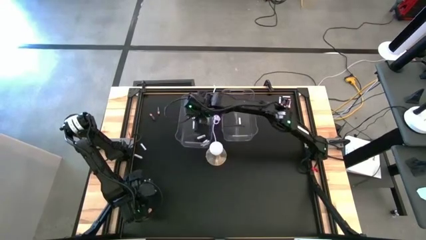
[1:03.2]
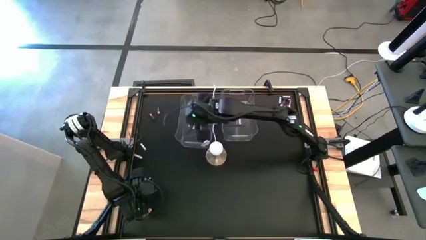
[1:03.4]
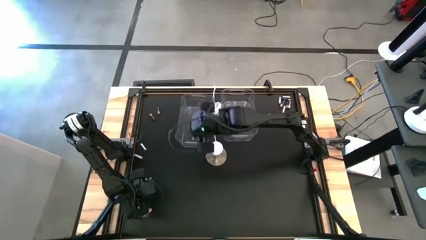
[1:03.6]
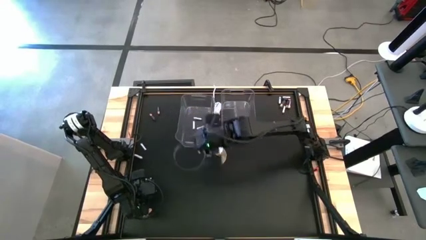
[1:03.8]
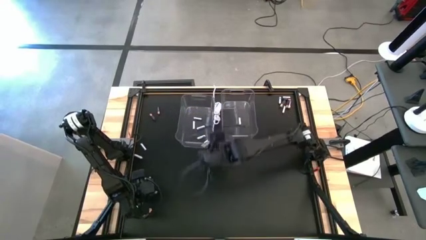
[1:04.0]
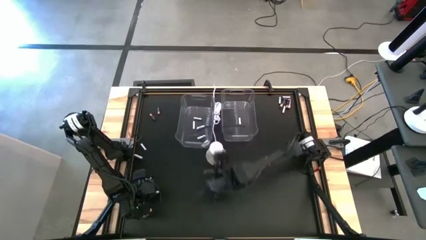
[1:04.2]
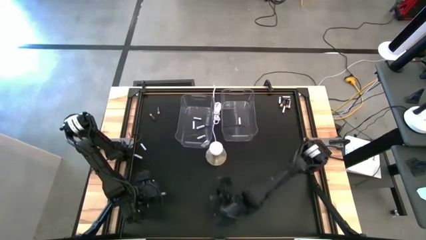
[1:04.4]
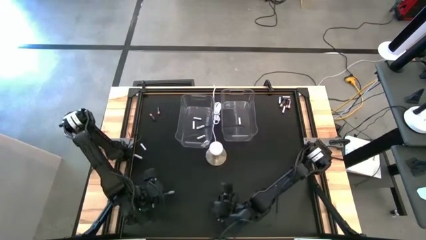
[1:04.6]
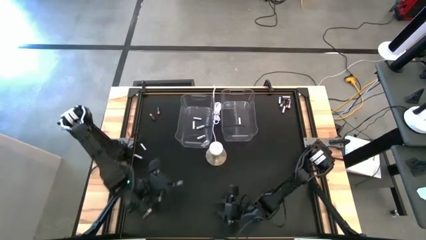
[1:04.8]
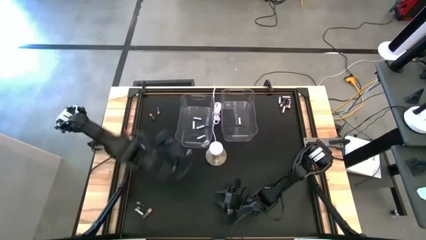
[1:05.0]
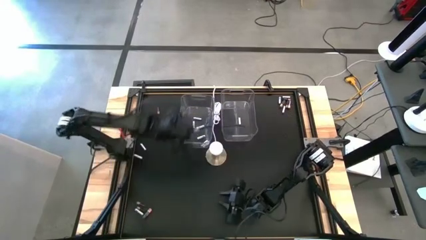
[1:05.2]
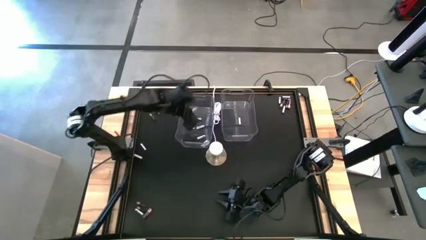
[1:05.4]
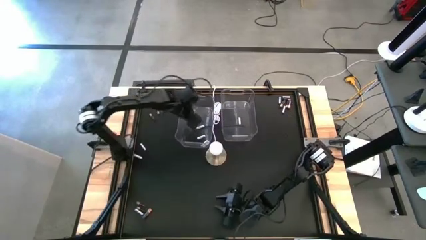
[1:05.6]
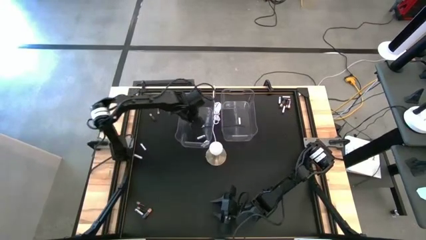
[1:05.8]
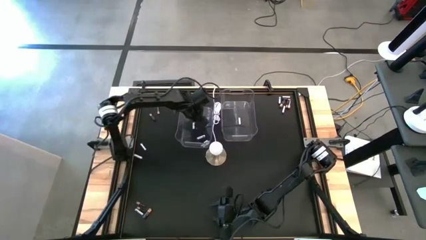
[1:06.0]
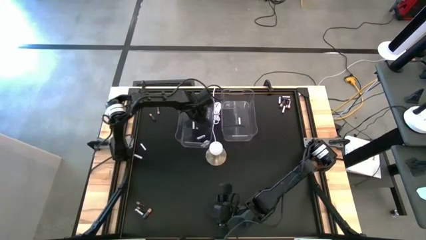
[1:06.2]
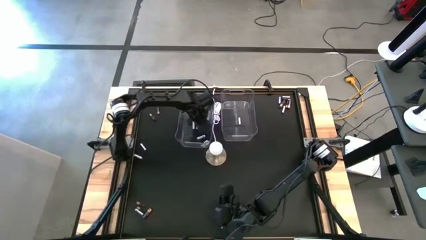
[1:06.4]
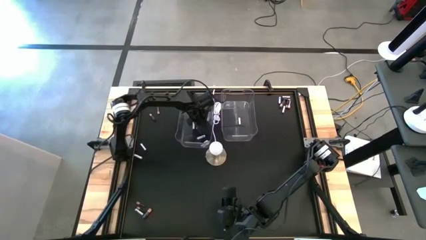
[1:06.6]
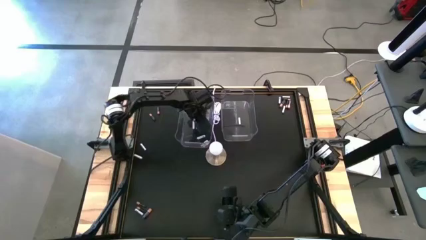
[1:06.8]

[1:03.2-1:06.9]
Task: Sort batteries
Put the white battery into the left transparent bin

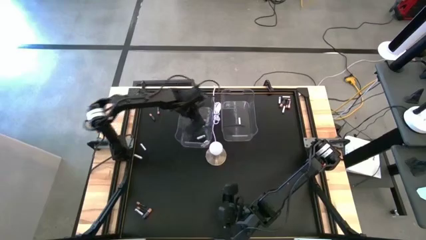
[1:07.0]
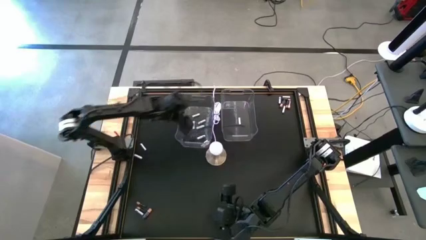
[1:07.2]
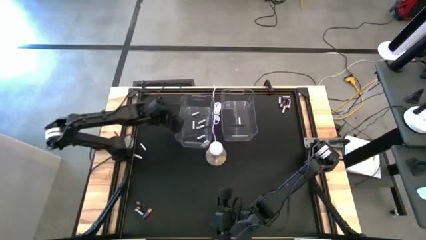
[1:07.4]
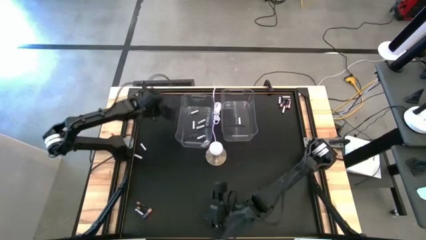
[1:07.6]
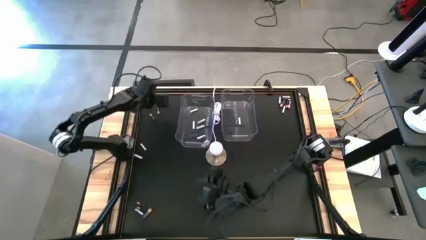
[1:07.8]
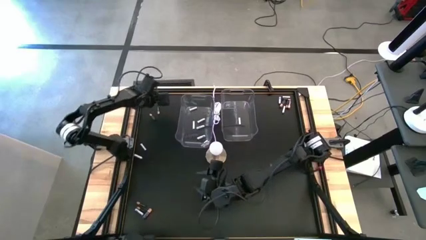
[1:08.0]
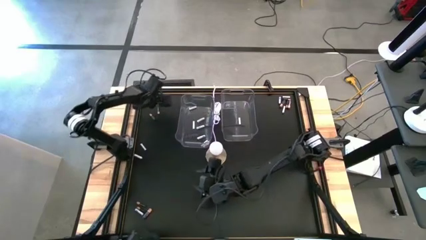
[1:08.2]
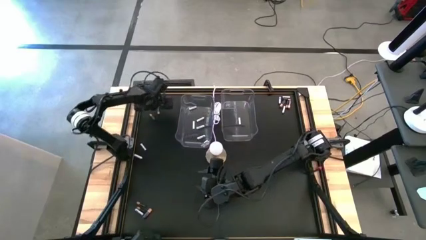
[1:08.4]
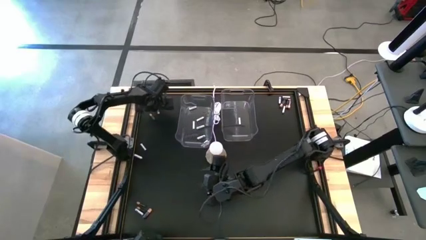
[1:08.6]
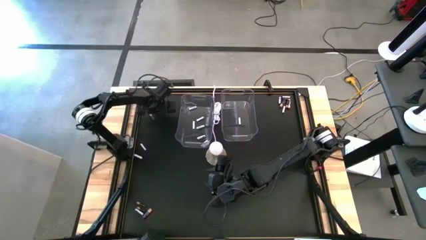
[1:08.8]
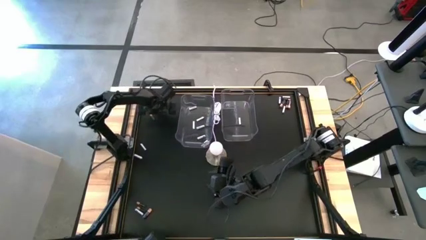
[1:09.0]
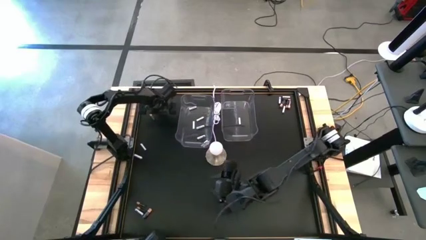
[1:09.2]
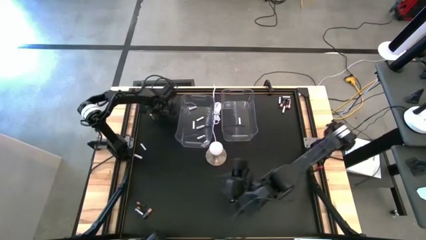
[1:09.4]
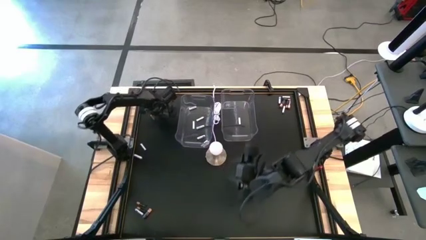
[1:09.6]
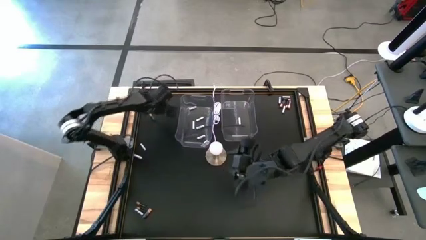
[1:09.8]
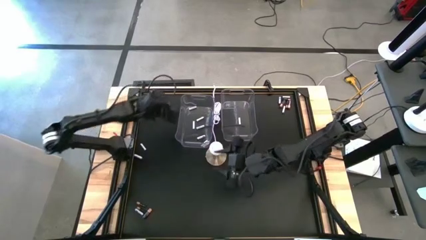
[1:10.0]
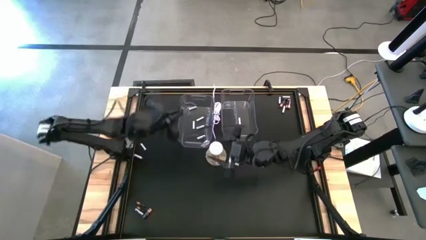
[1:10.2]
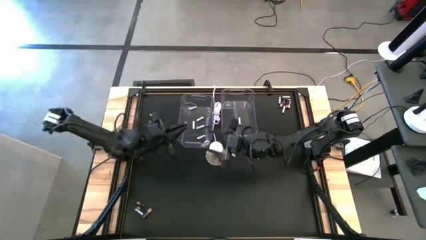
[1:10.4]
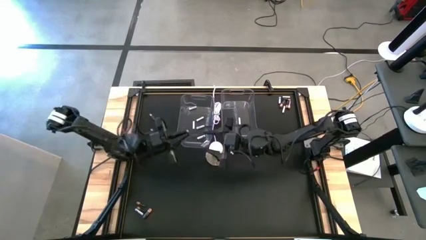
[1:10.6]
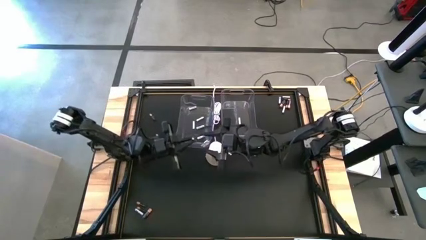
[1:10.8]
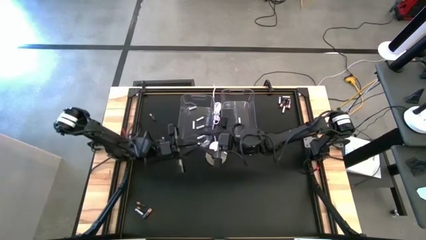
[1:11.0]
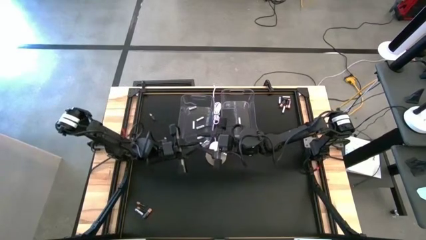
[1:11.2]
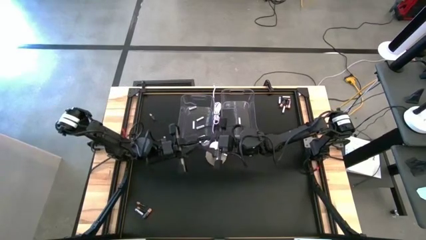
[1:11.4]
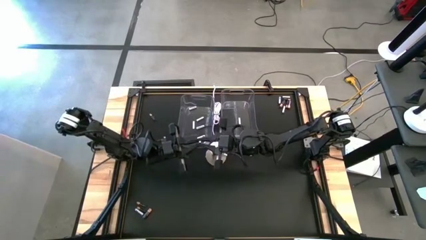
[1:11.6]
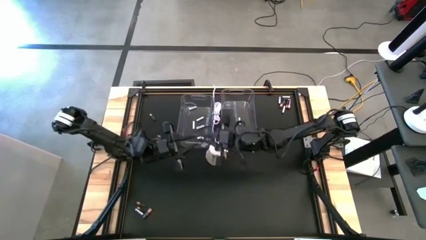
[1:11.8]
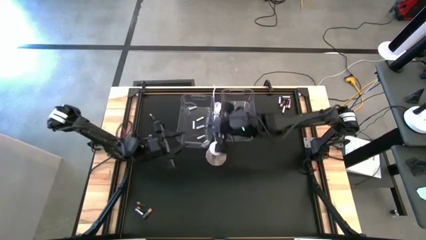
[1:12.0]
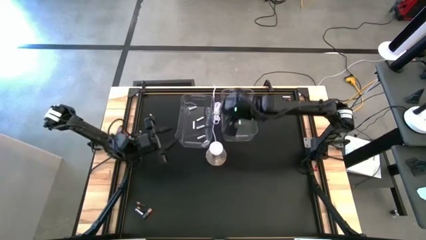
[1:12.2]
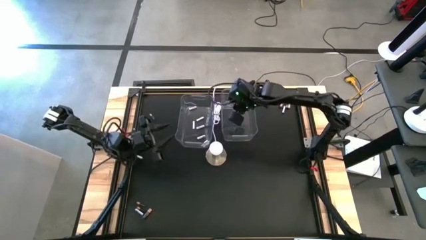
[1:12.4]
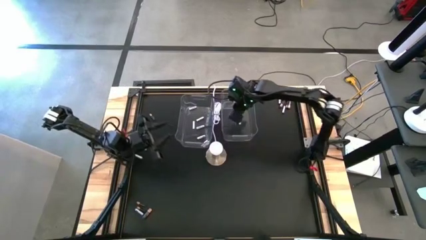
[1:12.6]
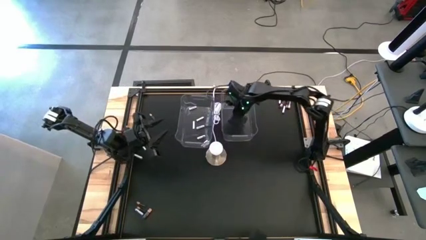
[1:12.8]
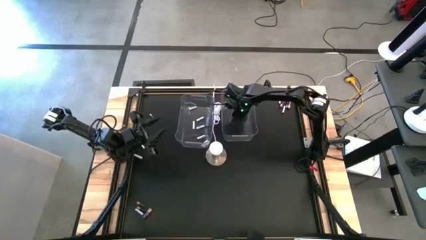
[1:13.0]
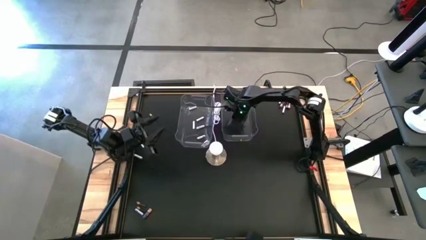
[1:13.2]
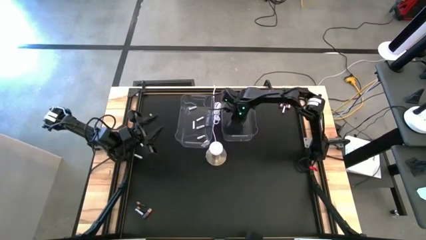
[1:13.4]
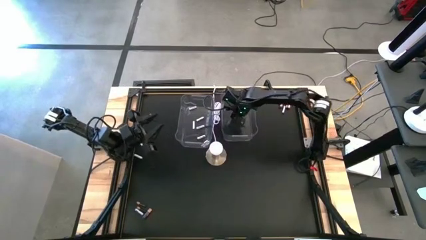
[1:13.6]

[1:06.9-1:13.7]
Put the black battery into the right transparent bin

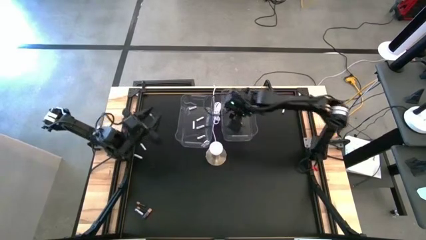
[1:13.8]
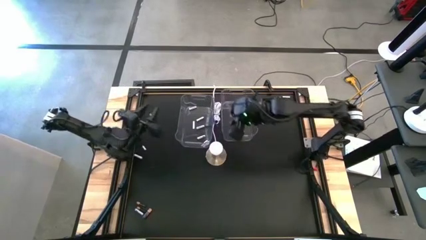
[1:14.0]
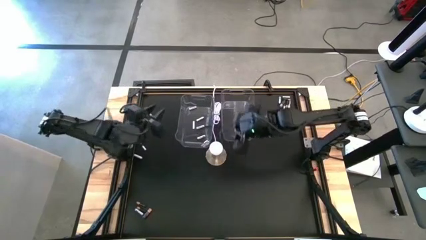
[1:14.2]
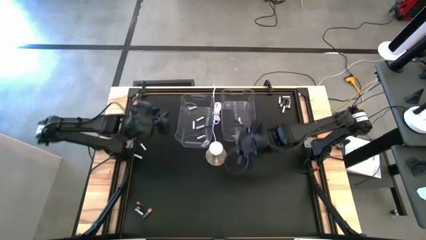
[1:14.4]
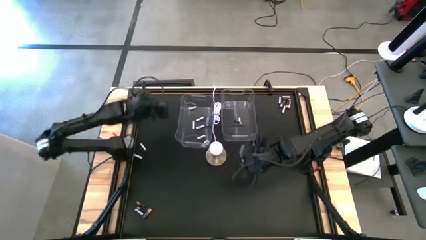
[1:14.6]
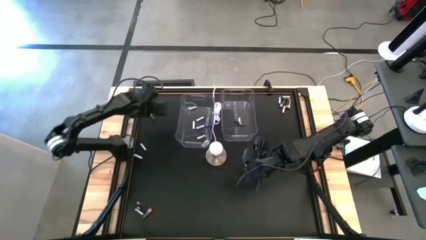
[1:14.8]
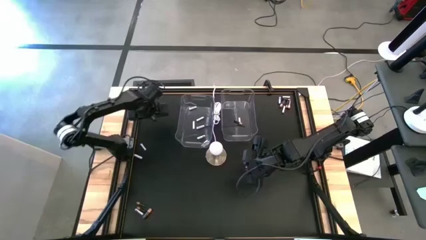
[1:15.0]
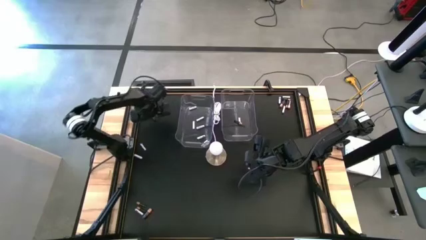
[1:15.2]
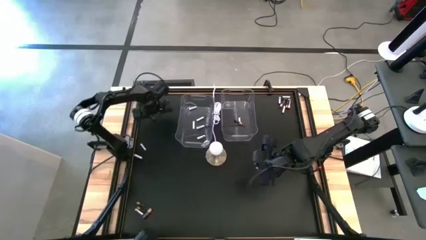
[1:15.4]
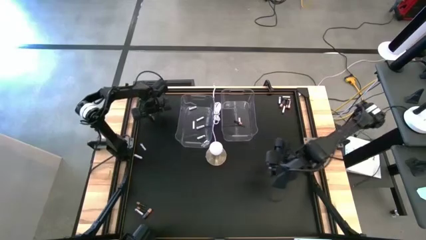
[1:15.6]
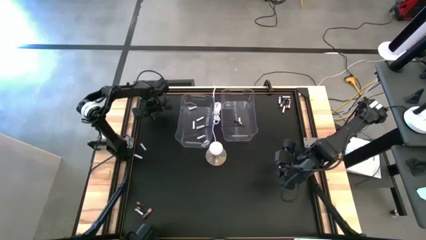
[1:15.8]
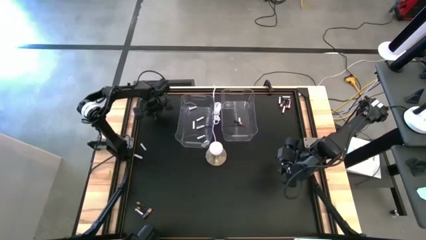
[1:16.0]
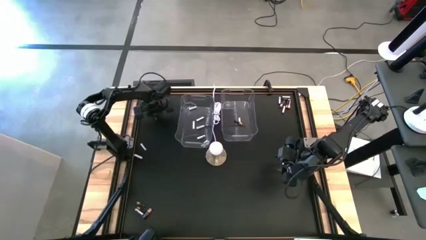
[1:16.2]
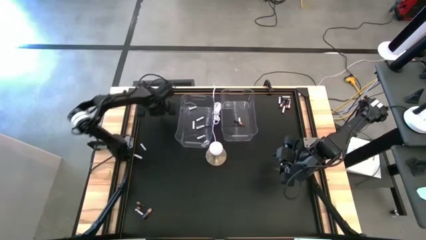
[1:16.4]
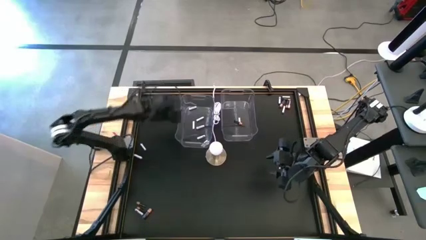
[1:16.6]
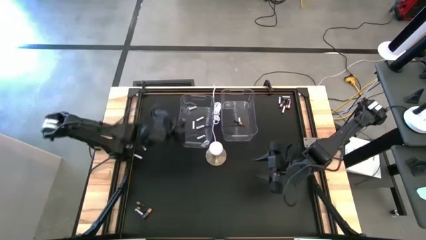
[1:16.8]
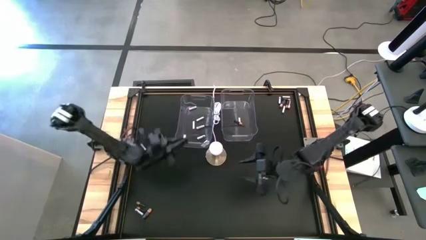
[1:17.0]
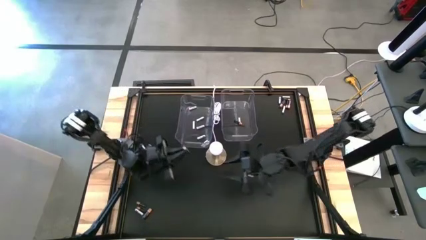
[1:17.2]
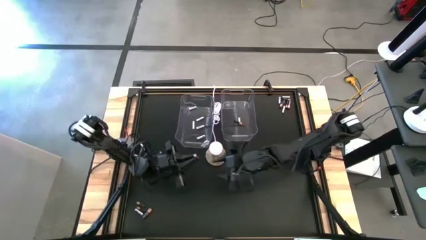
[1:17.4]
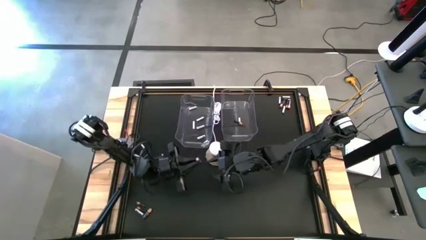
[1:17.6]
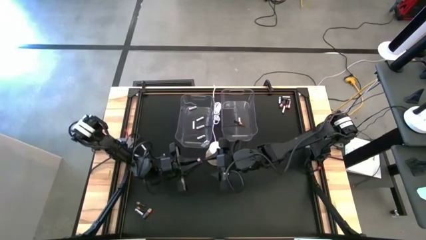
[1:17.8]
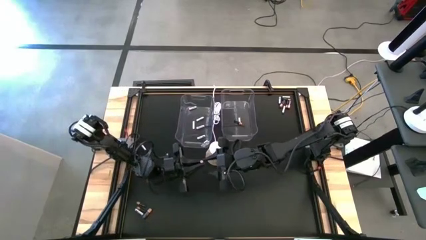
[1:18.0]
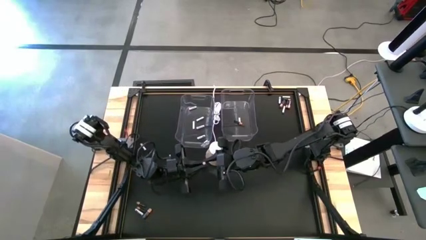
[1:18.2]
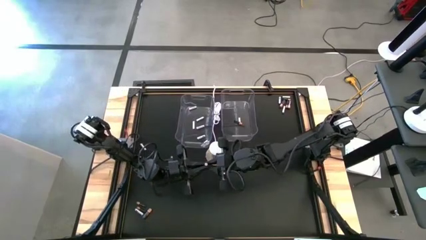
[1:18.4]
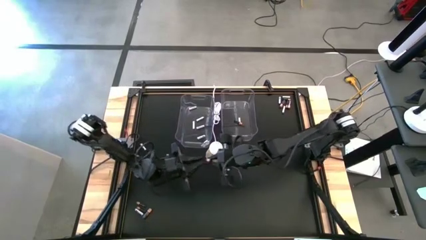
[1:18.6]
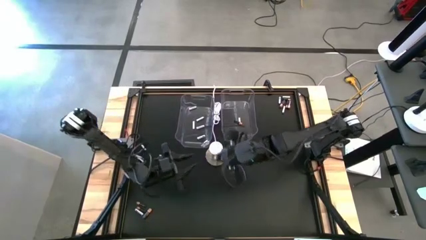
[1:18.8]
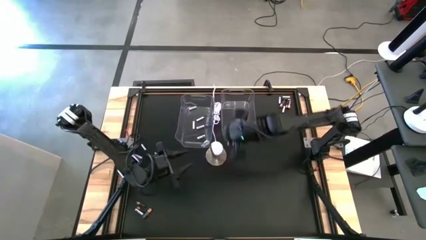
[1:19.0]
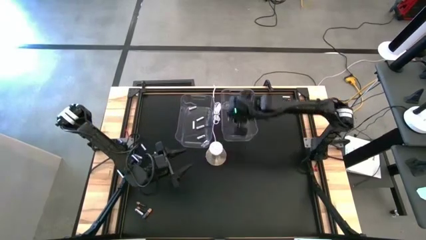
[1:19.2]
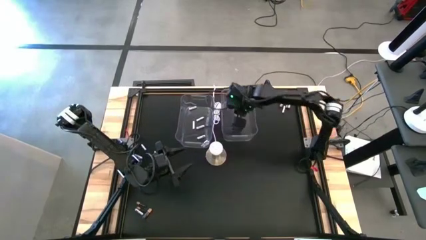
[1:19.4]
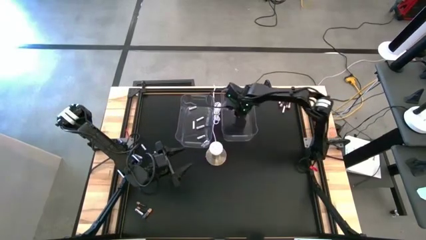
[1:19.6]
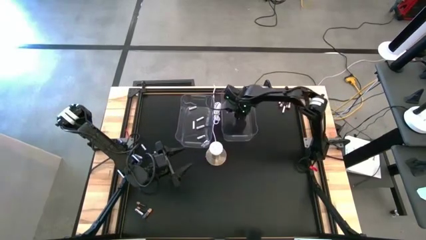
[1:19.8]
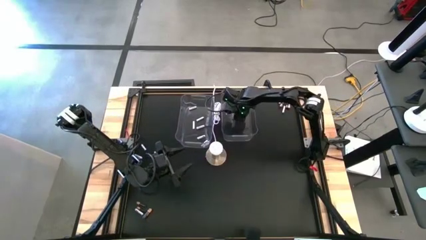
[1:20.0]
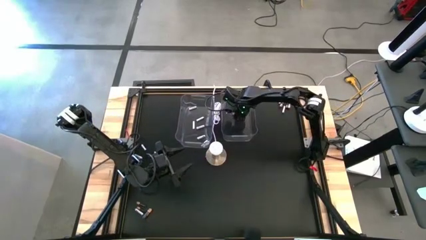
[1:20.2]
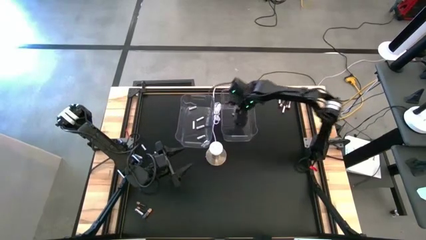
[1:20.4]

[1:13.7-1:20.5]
Put the black battery into the right transparent bin
